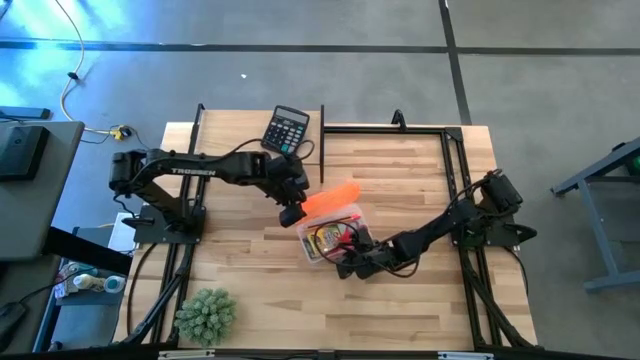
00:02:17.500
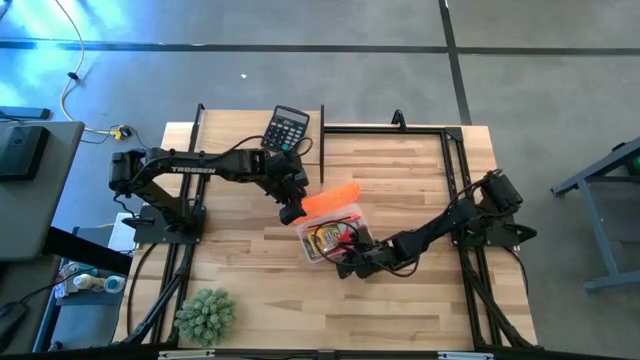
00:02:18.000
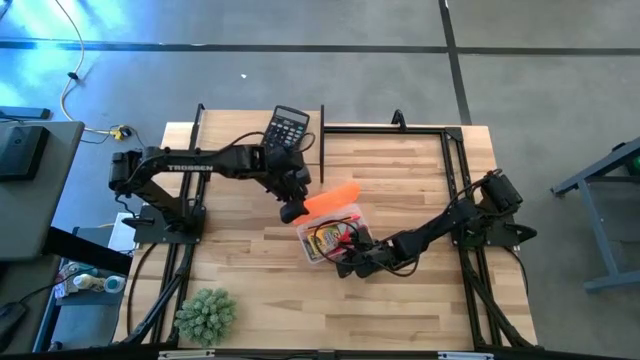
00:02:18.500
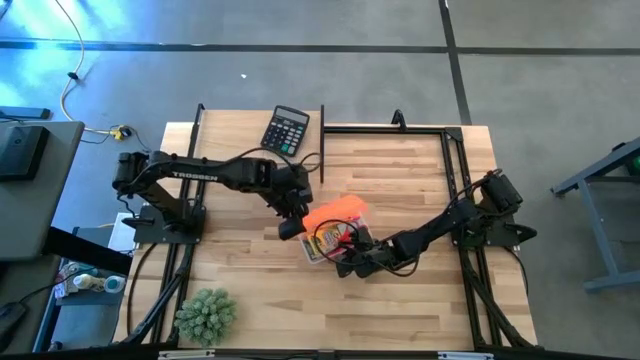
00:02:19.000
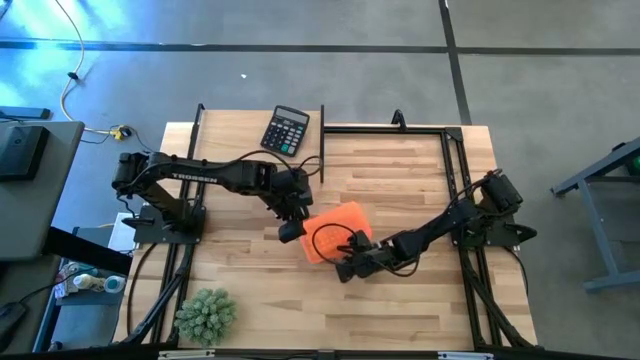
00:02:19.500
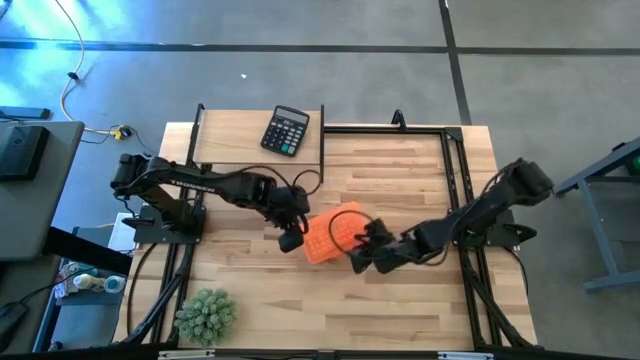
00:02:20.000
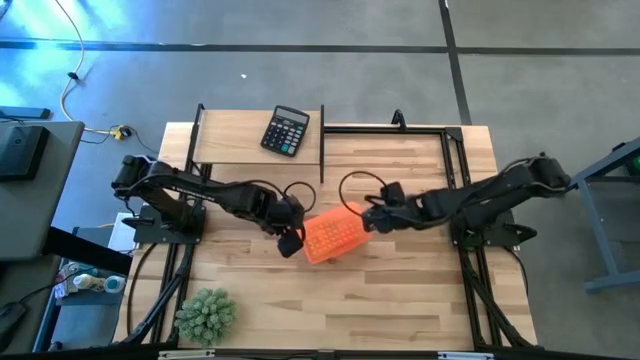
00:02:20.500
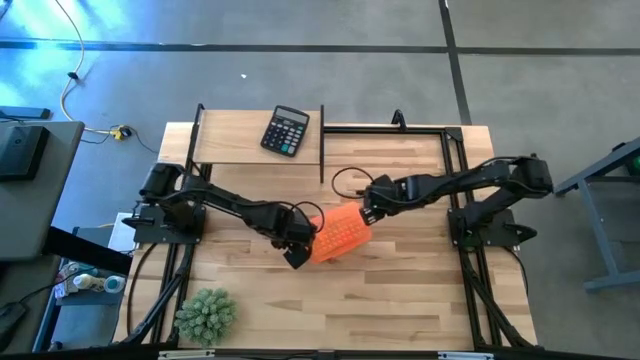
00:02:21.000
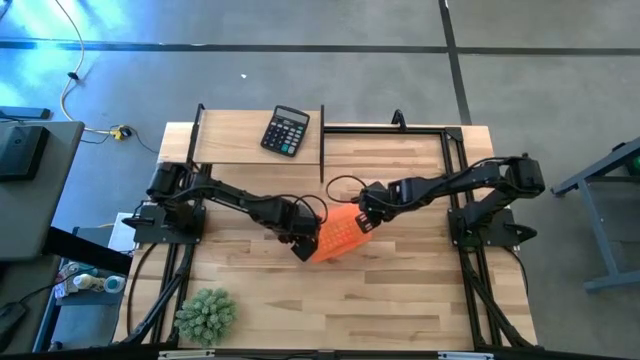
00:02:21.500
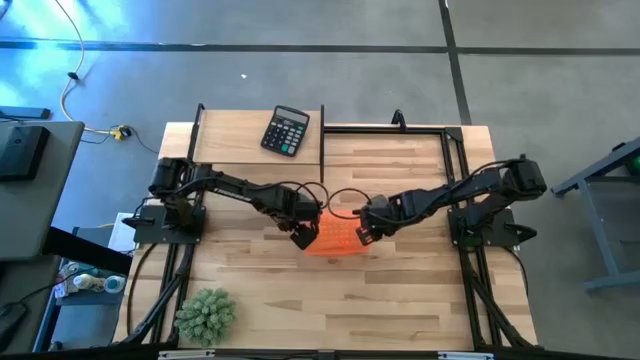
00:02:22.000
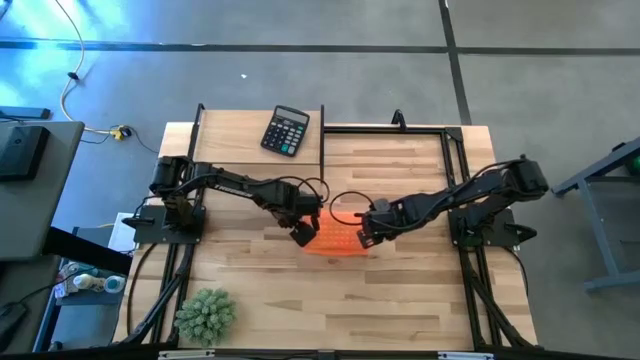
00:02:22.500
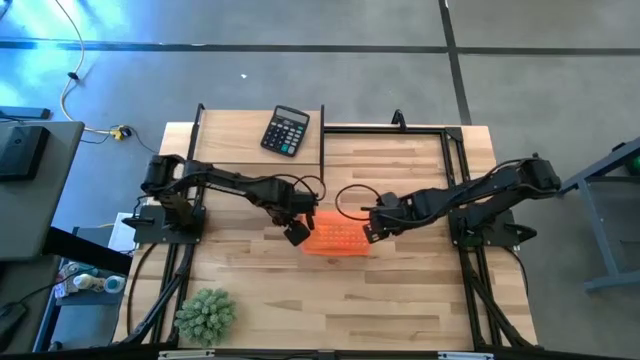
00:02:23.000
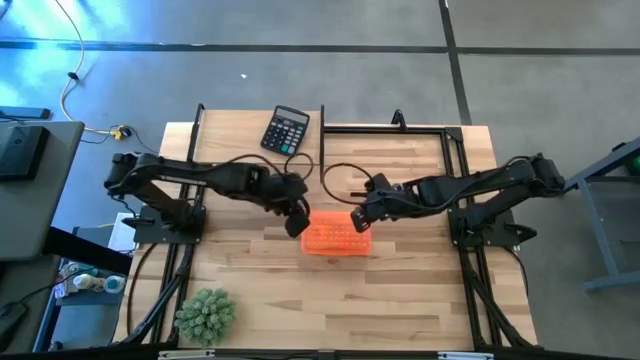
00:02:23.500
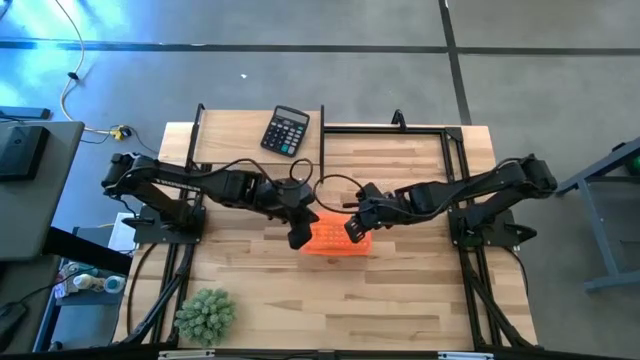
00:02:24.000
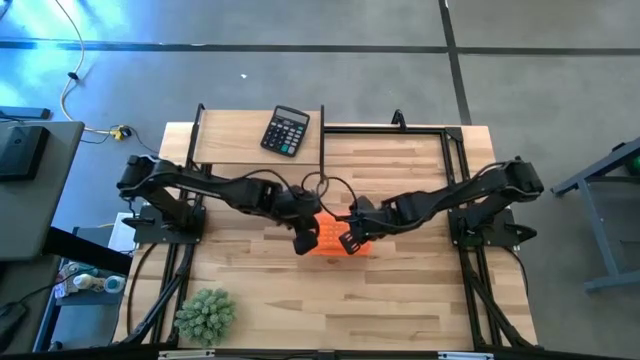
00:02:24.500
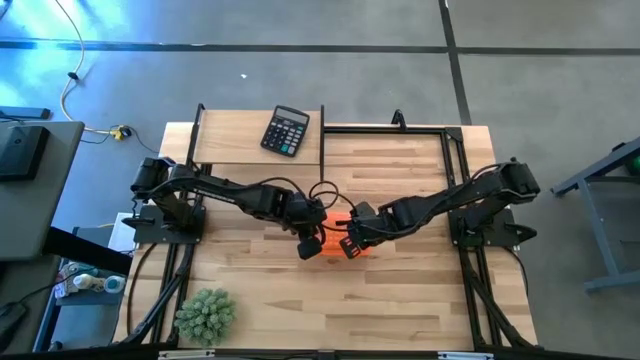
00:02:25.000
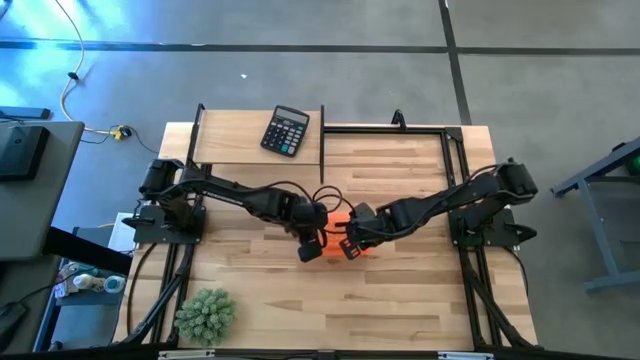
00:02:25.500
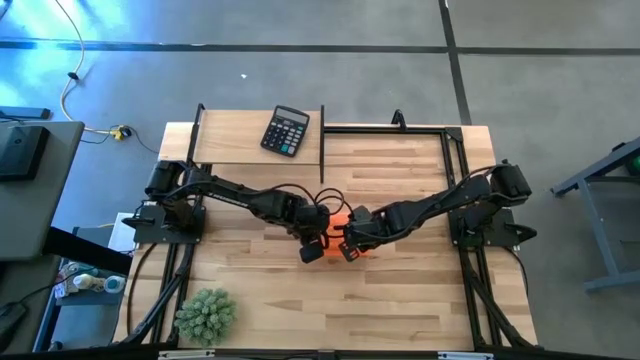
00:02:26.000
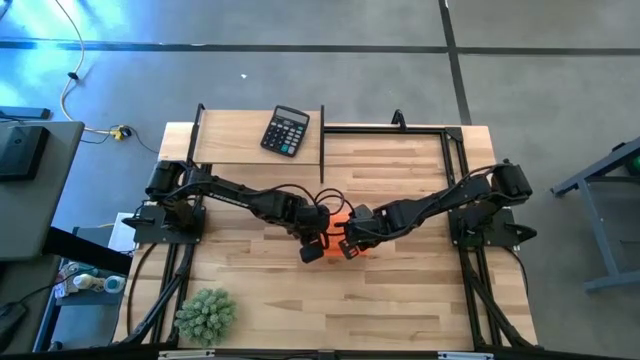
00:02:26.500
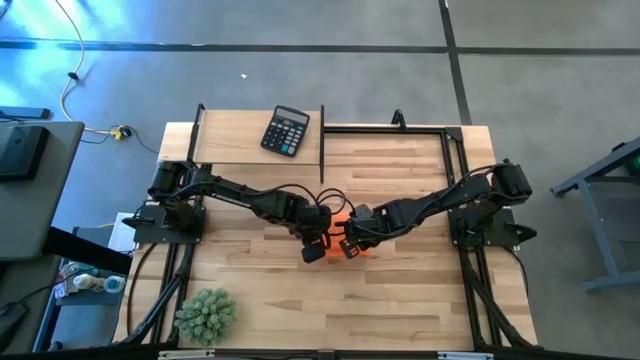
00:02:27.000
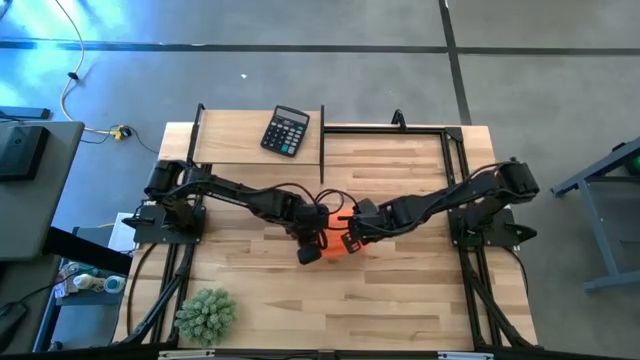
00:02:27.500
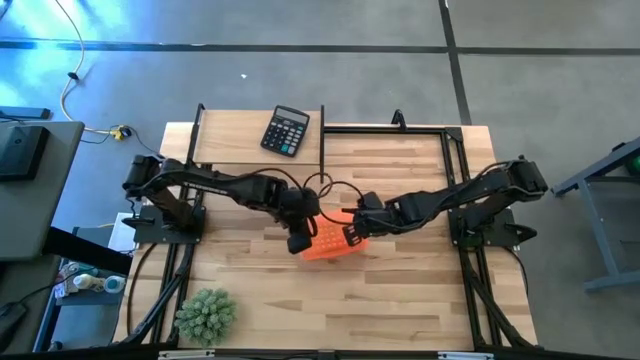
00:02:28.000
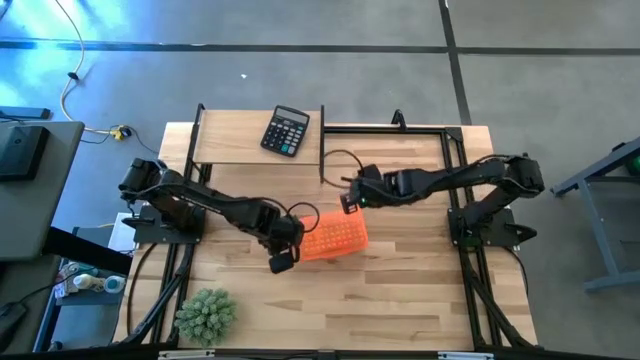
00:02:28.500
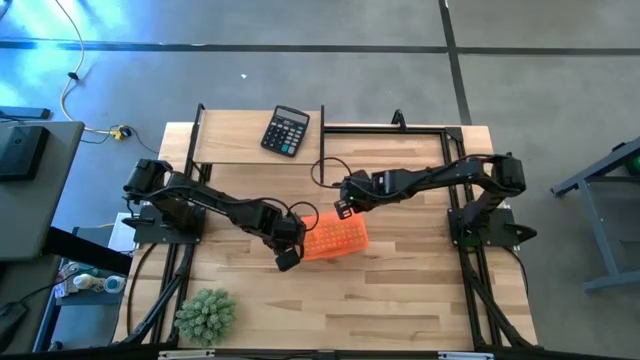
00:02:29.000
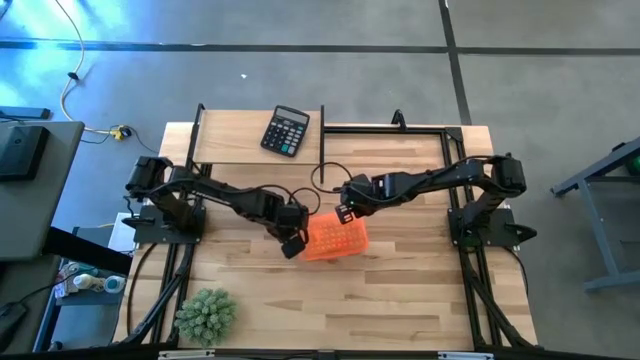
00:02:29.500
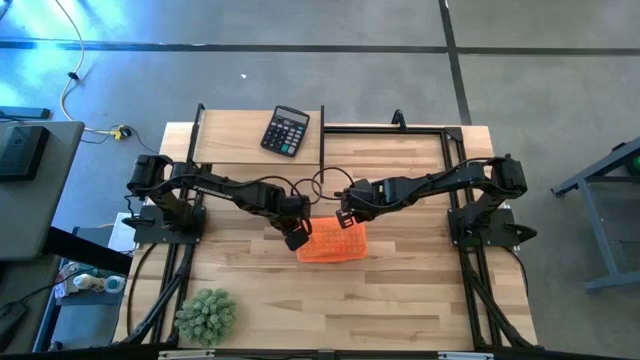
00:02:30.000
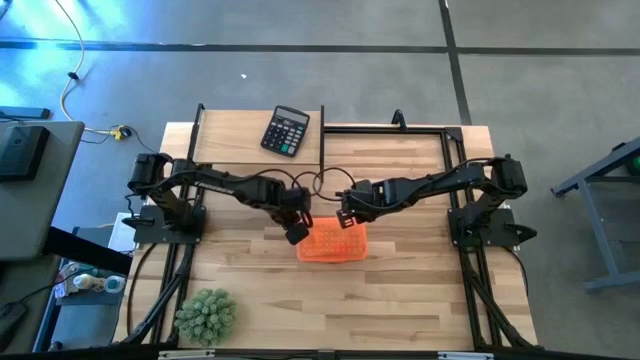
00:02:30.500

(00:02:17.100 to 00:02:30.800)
Task: Pack school essentials
Close the supply box

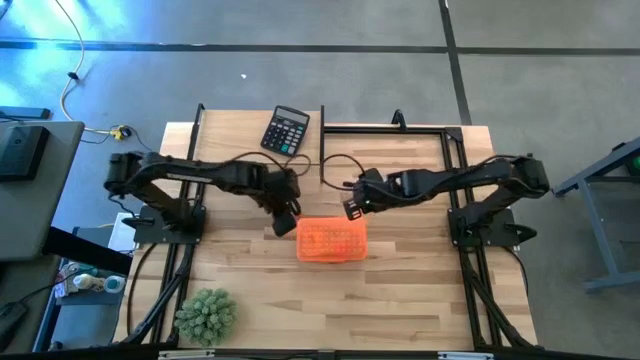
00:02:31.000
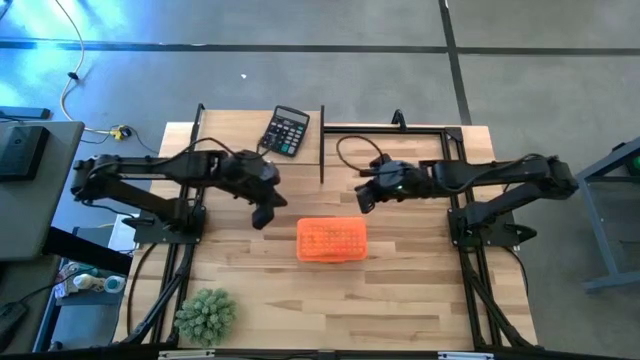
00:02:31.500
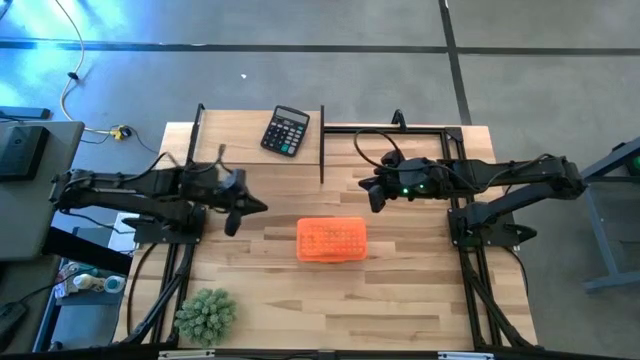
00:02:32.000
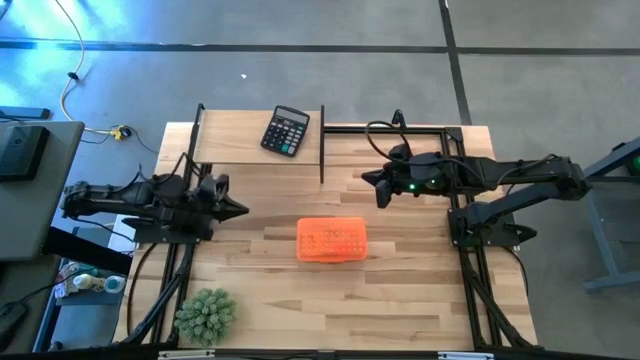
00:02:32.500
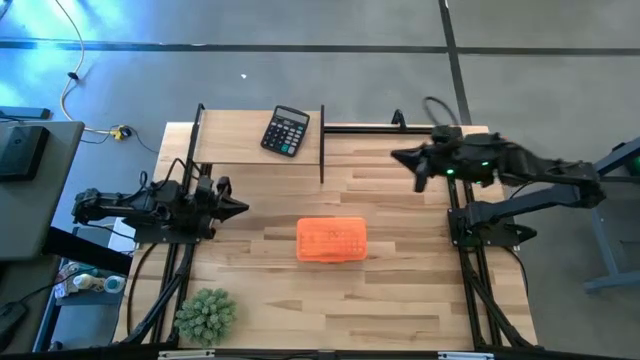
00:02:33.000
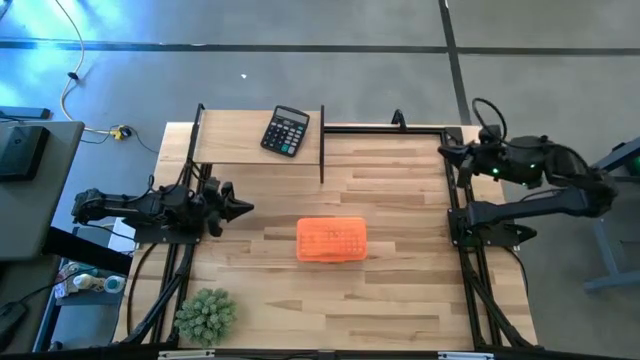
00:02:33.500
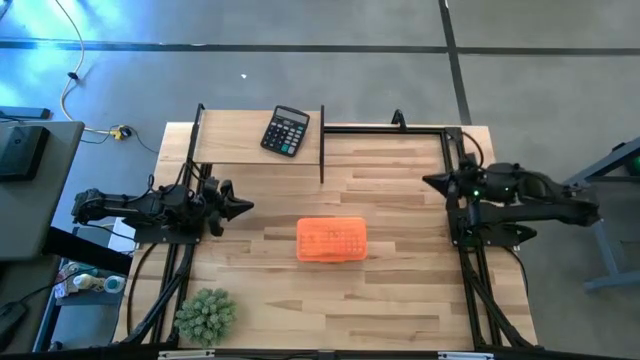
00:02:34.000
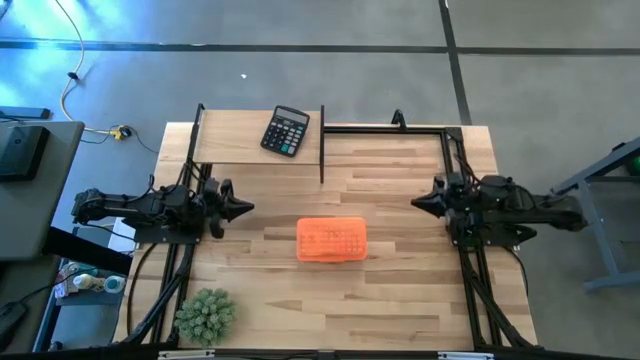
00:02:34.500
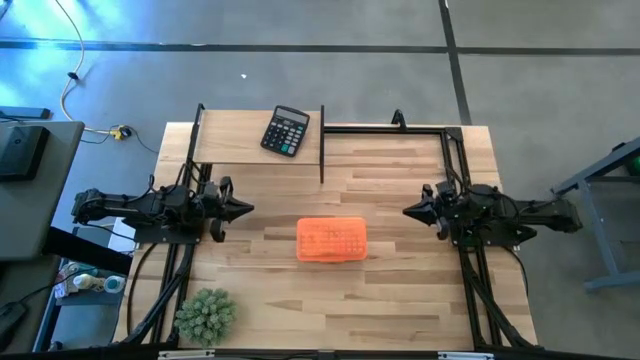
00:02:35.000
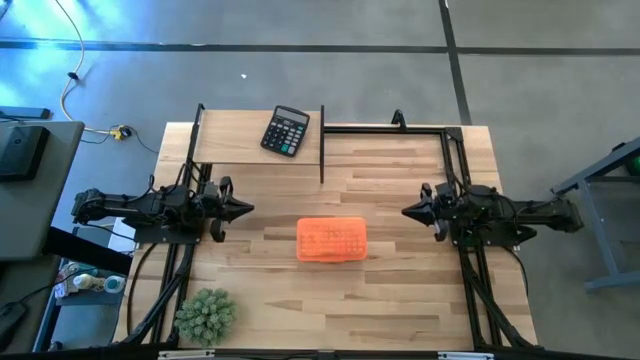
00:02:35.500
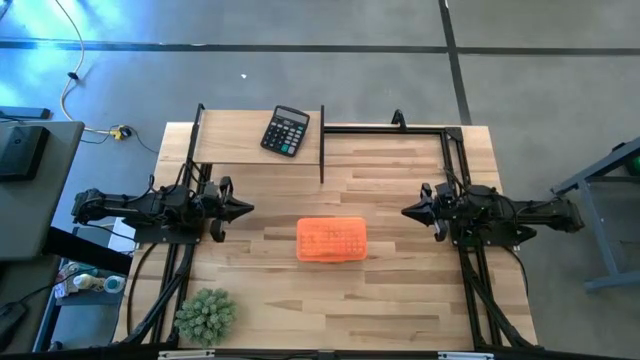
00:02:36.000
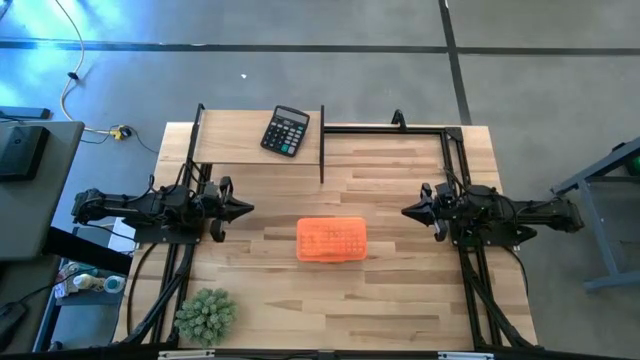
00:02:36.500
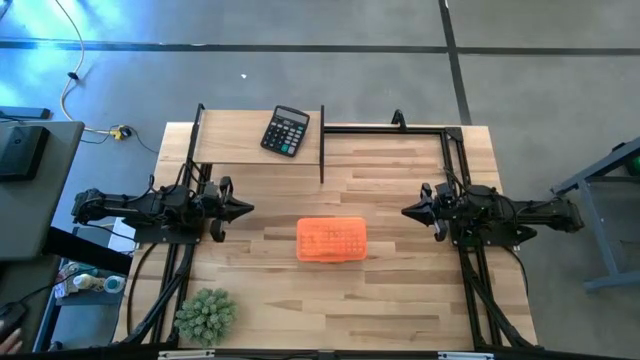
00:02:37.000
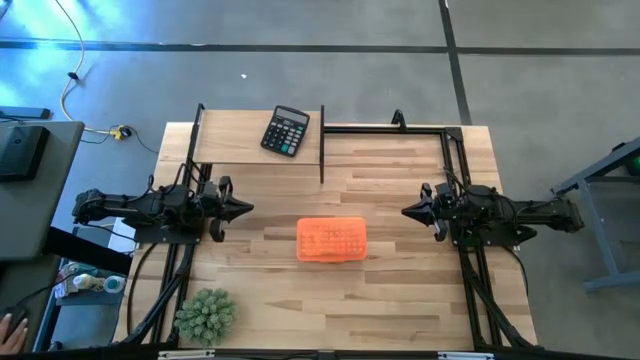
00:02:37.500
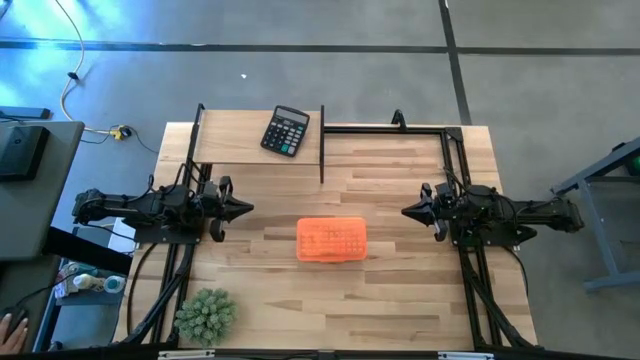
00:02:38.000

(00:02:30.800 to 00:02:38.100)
Return to Home Position

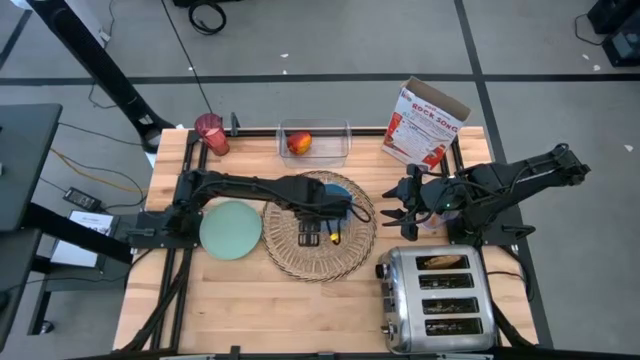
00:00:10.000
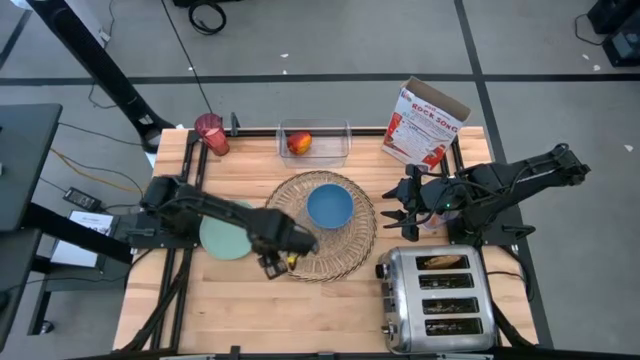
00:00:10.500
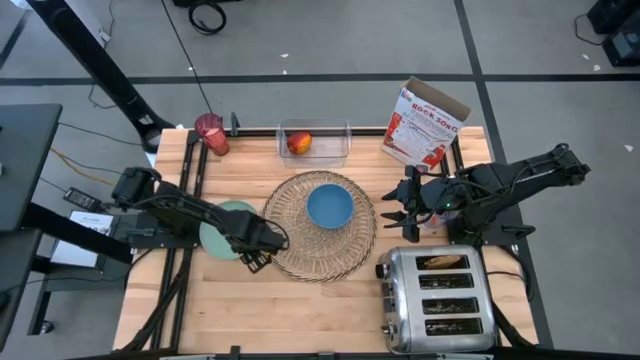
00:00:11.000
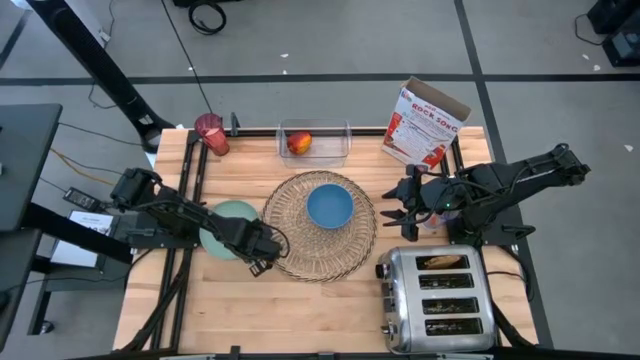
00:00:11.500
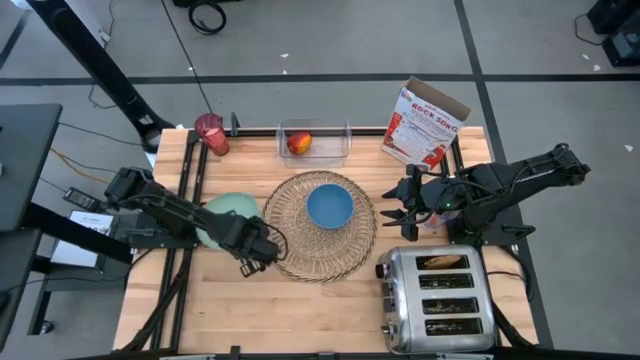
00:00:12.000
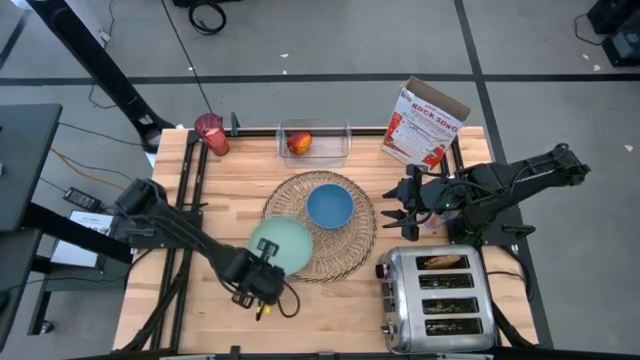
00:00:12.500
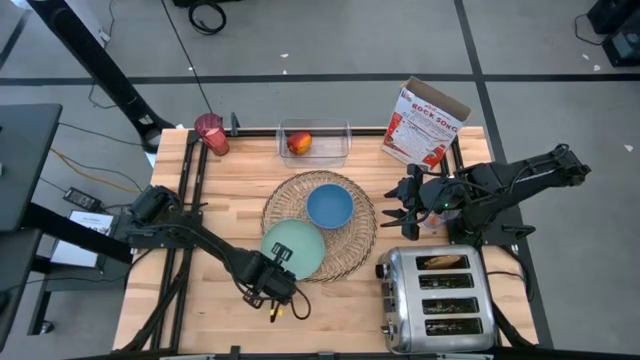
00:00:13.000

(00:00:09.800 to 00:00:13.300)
Task: Arrange a breakfast setting
Put the green plate on the table mat
